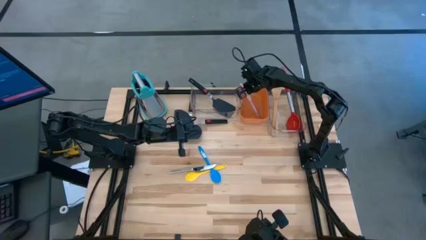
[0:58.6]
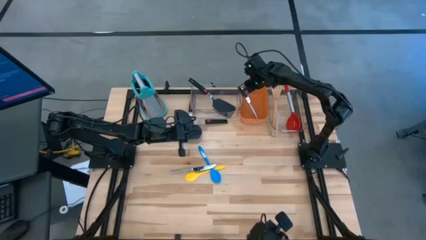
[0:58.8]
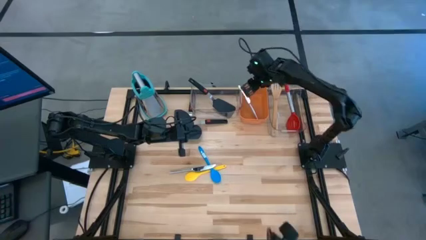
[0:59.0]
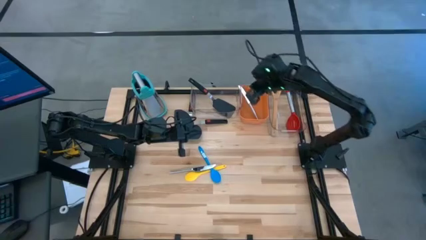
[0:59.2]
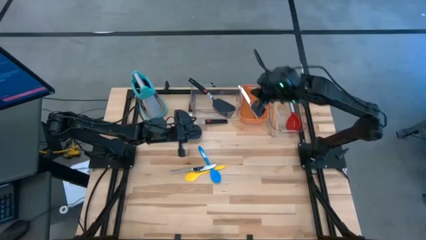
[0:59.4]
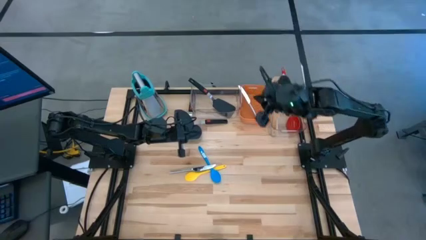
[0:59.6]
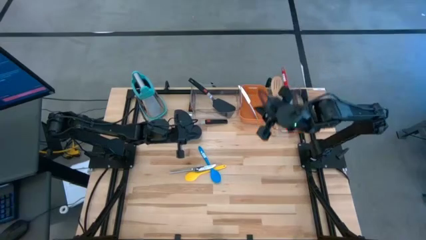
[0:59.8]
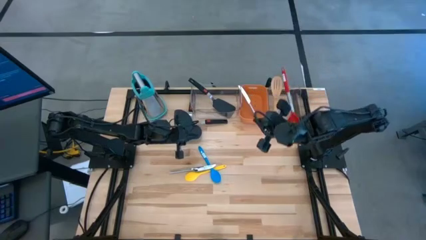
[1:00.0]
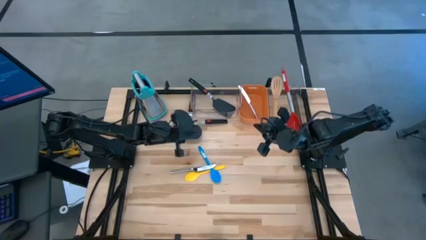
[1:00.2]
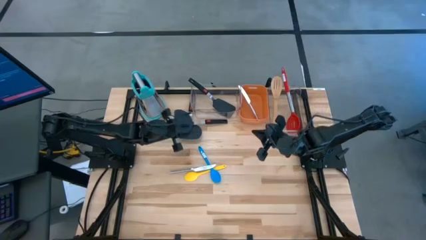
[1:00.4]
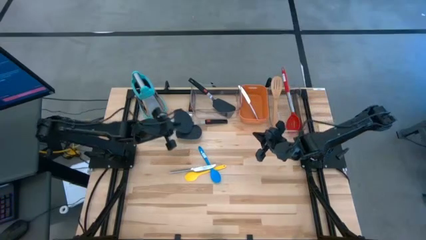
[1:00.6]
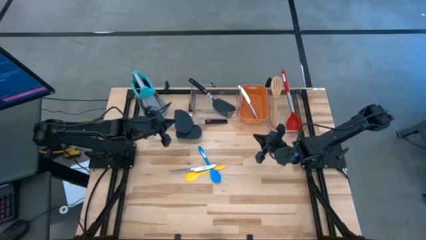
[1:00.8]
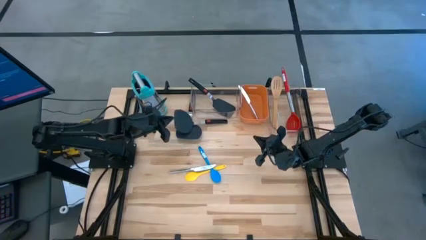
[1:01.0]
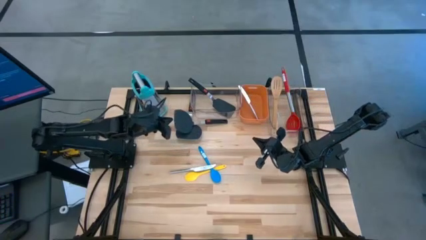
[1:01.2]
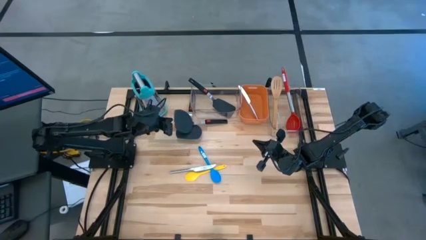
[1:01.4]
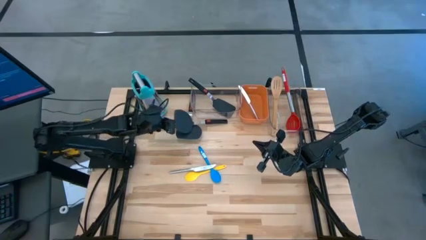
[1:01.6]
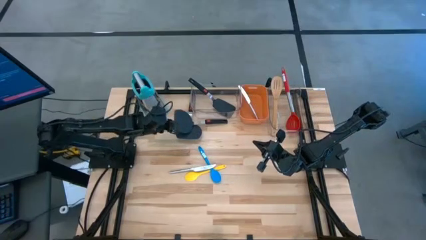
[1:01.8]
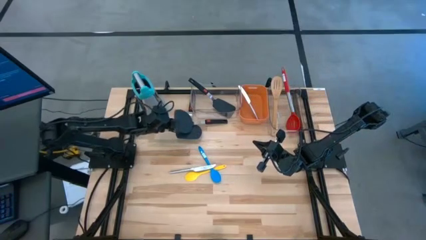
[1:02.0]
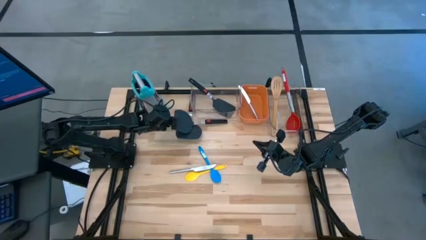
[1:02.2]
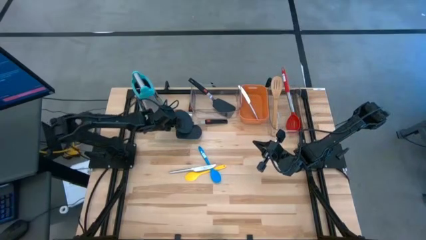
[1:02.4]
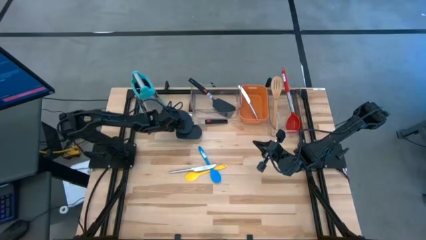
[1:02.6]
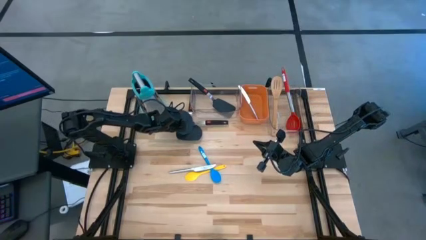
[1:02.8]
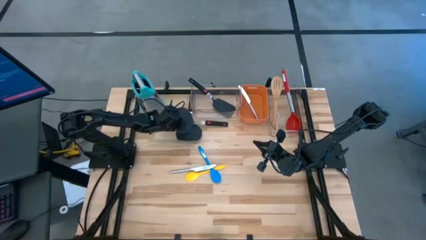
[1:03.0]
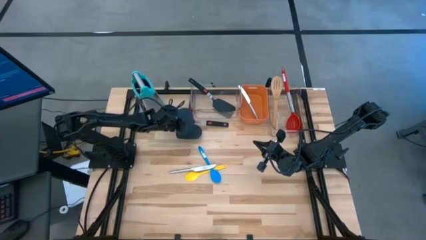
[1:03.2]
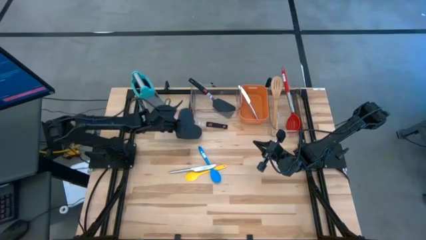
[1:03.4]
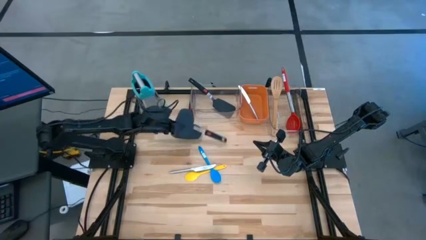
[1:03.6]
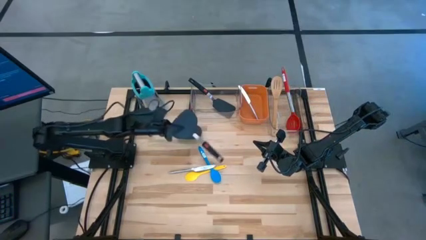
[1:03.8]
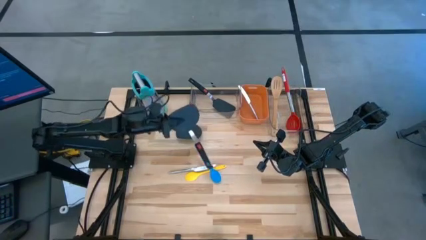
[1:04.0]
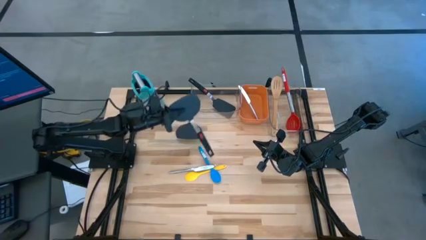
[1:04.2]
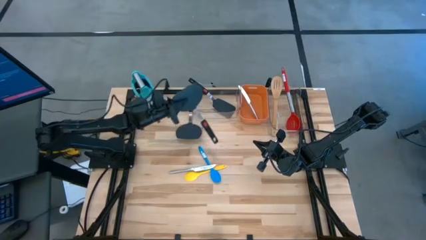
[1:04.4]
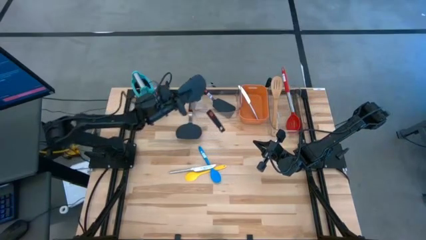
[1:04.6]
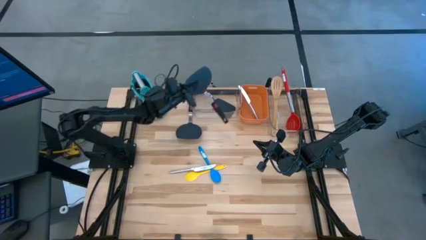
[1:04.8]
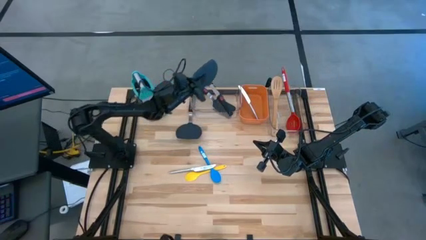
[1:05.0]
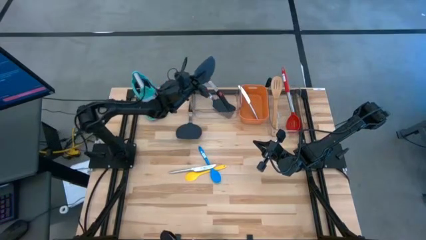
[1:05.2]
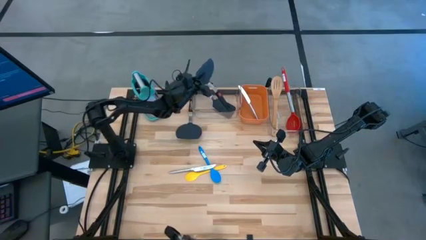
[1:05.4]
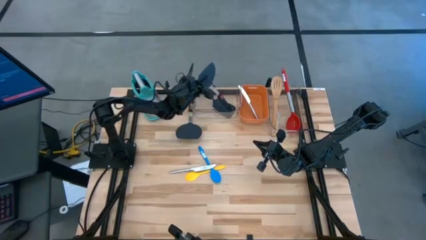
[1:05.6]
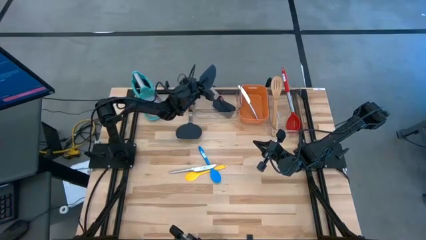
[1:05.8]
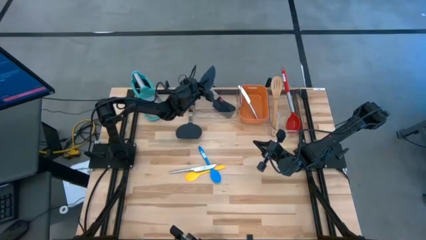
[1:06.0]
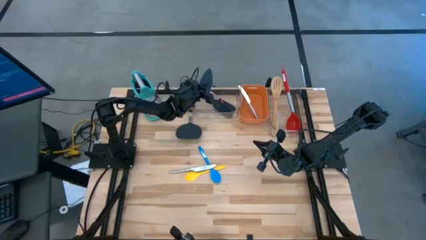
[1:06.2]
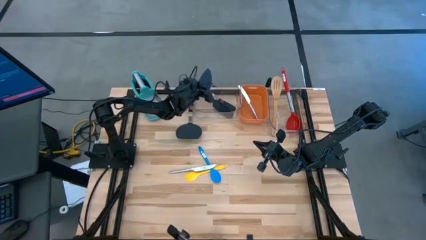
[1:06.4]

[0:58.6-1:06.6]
Task: Pick & Place Kitchen Items
Put the top scraper spatula in the left transparent bin

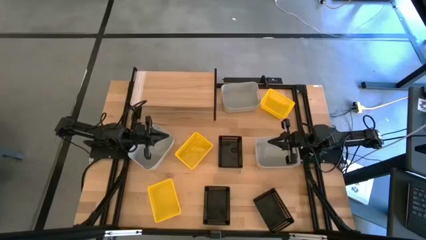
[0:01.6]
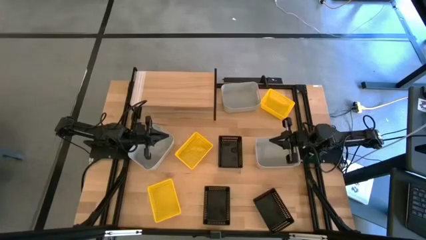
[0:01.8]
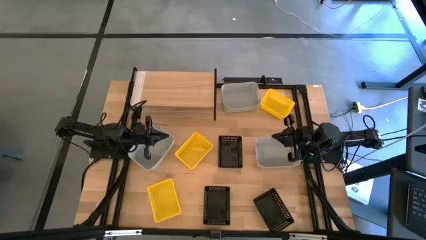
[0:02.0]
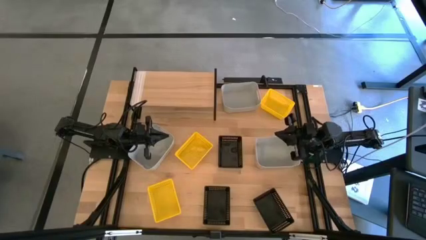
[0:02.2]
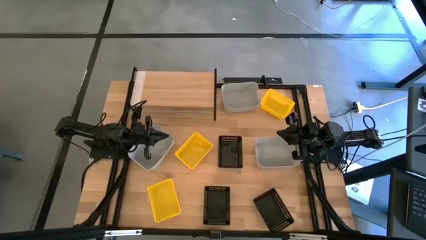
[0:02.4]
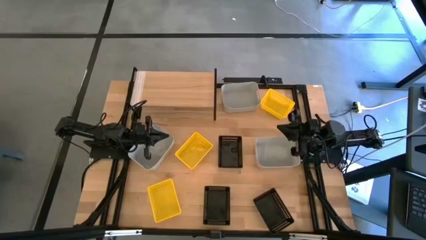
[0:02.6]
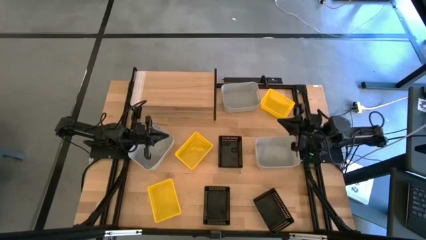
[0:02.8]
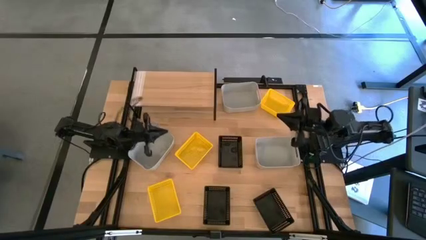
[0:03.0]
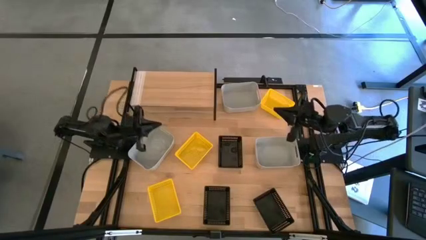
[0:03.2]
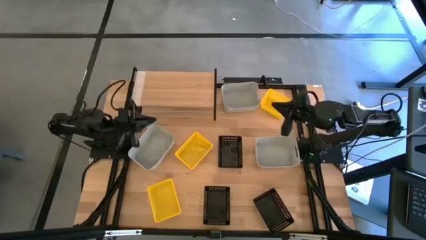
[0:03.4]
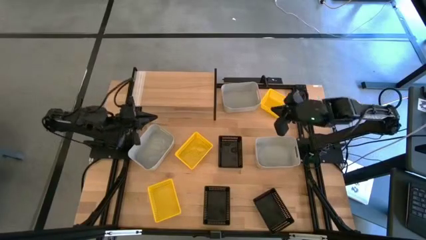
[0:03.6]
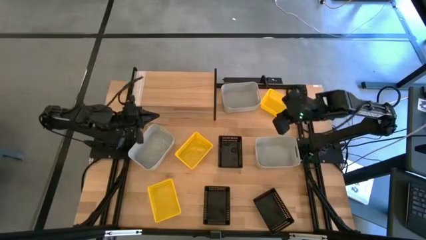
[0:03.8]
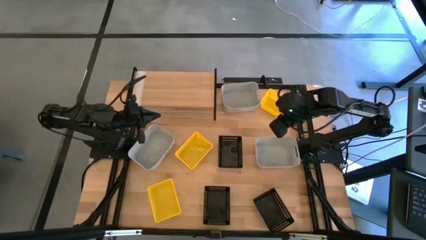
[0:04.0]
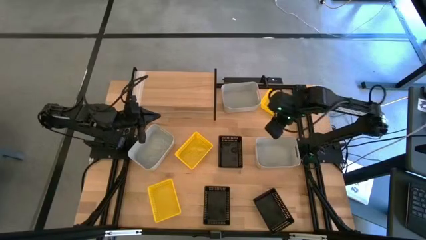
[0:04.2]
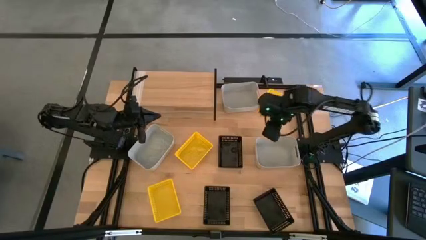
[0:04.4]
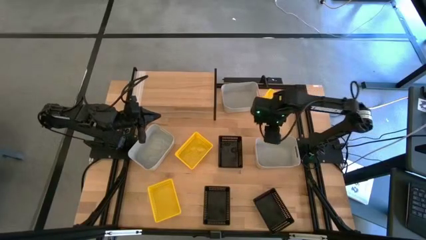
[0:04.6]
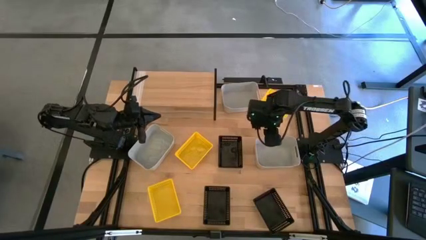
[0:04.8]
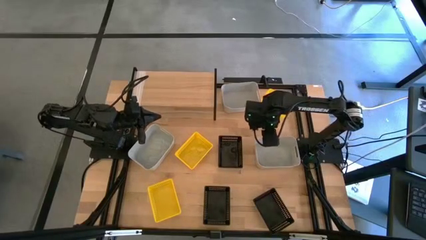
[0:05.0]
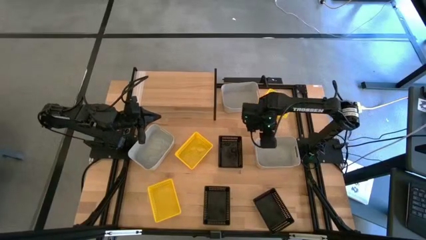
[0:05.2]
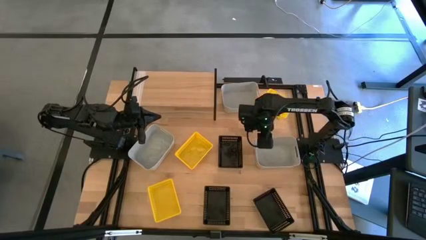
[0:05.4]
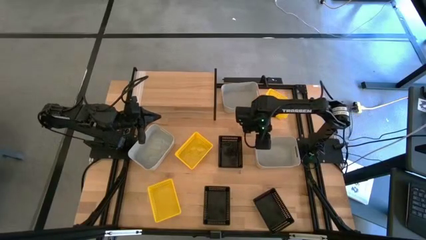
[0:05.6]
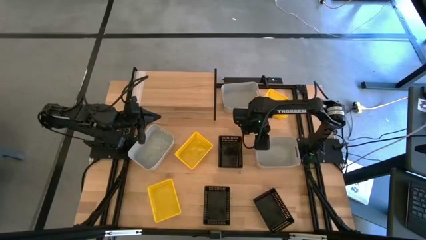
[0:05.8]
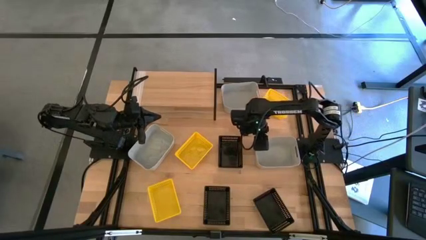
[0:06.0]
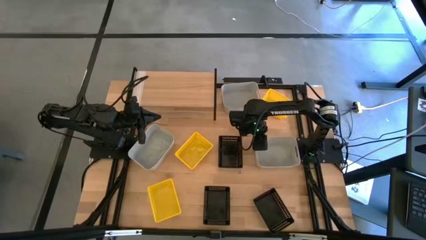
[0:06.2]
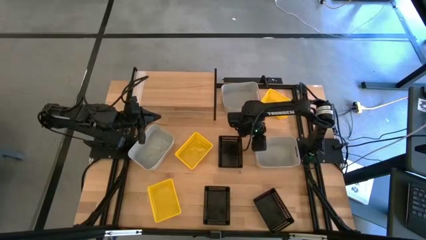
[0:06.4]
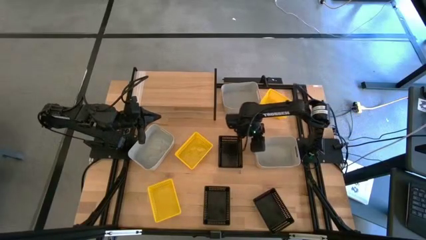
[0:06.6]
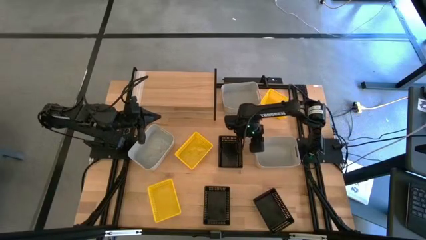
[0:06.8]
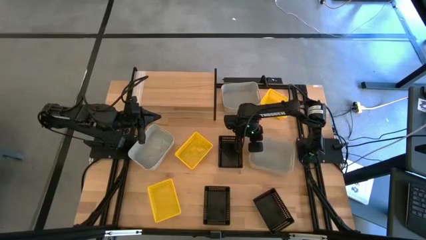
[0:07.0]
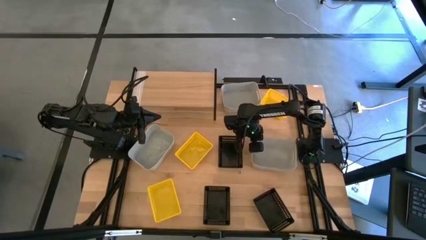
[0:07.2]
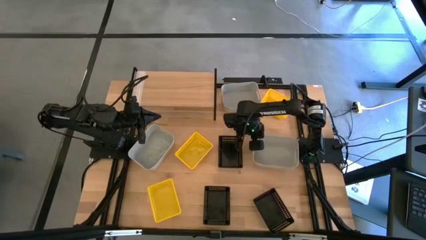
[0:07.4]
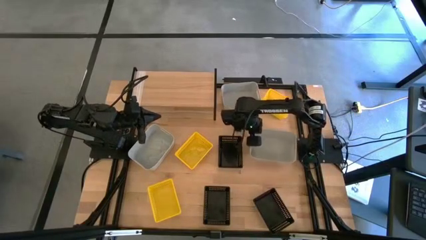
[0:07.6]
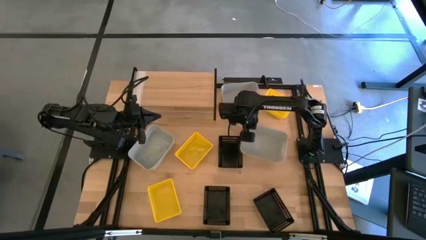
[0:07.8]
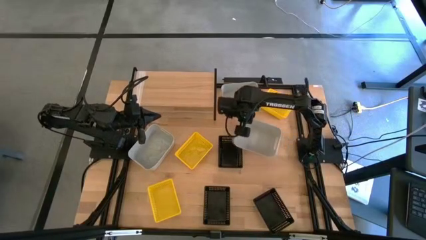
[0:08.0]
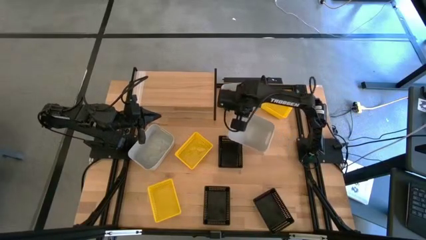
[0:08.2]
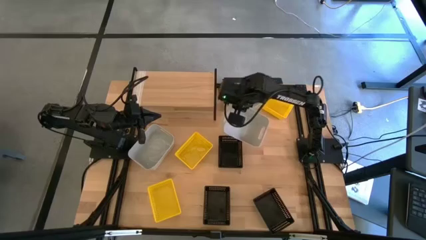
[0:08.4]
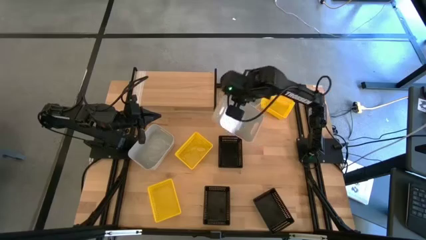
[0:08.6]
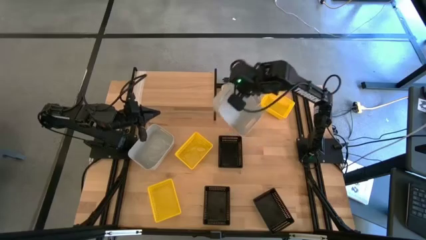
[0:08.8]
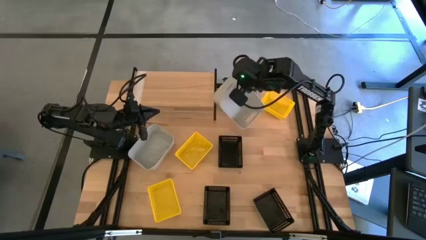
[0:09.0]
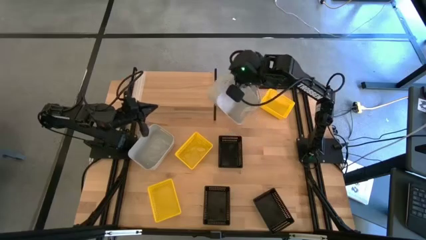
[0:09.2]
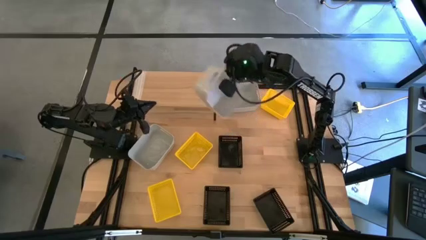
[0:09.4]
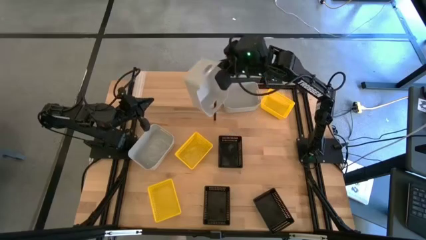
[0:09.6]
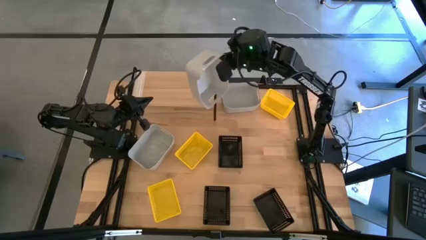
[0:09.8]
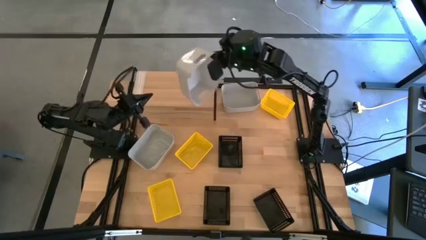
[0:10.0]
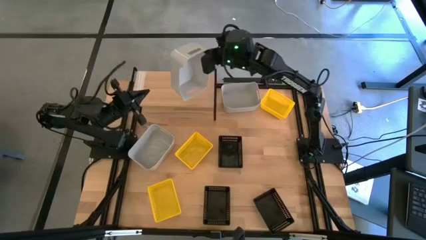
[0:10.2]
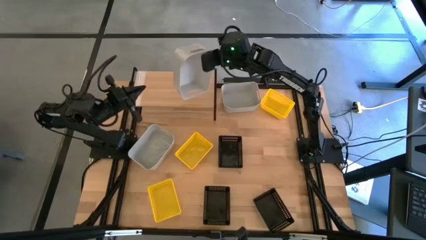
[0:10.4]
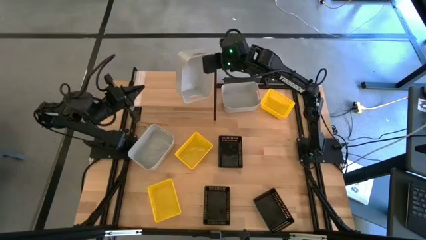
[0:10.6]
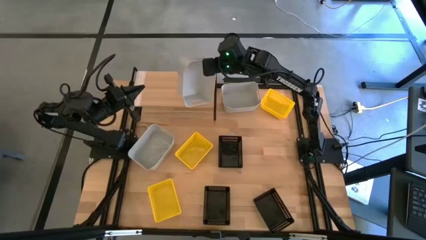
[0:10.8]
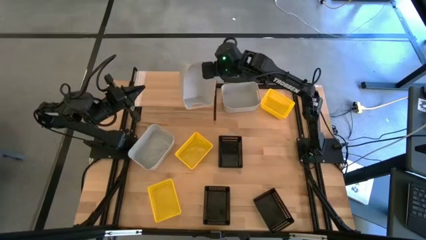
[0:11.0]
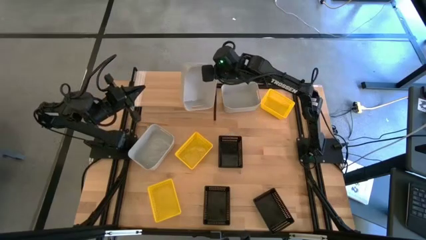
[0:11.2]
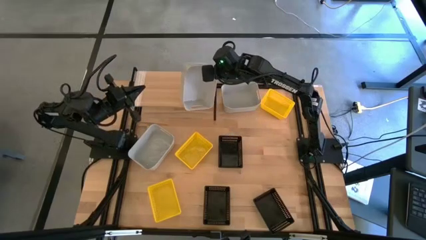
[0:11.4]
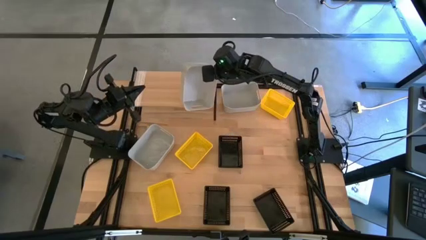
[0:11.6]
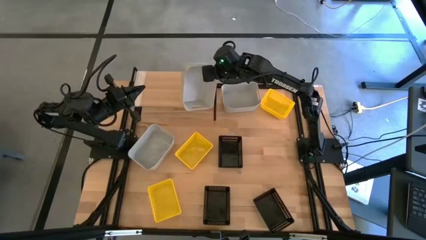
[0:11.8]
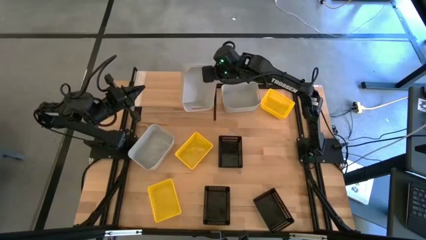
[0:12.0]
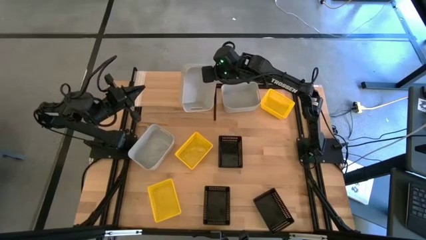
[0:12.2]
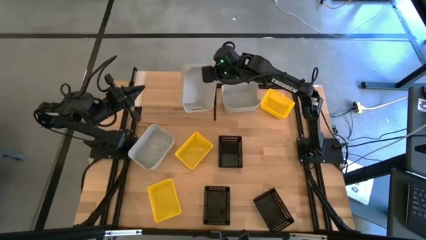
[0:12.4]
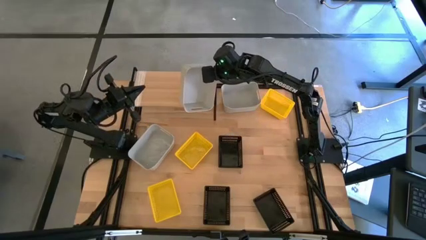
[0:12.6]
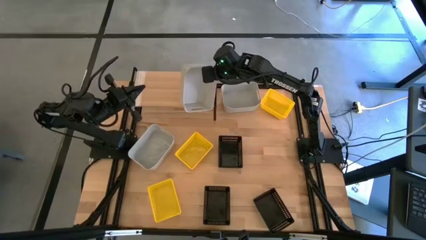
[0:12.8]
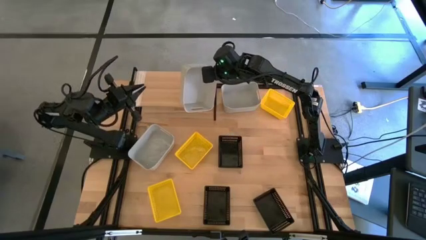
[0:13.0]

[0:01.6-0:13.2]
Task: Stack baskets on shelf by color
Put the bottom right gray bin on the shelf
